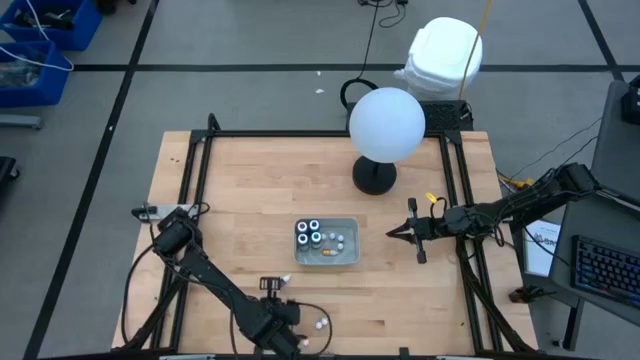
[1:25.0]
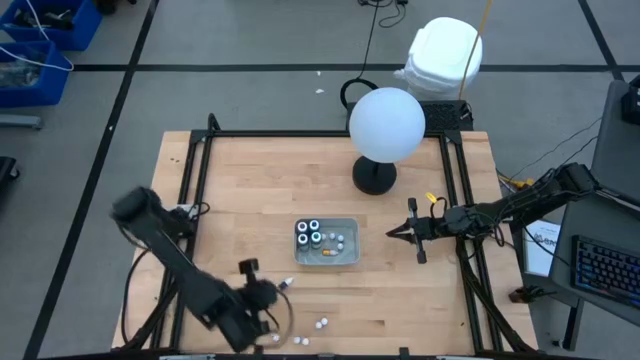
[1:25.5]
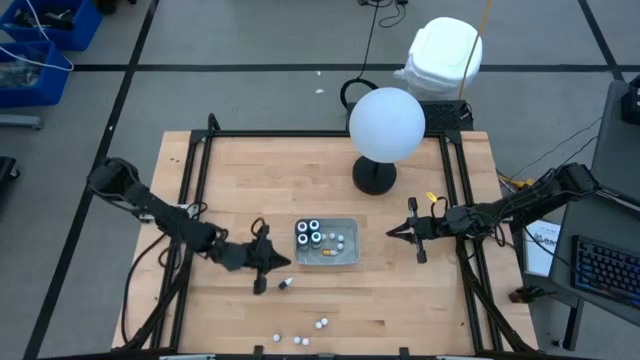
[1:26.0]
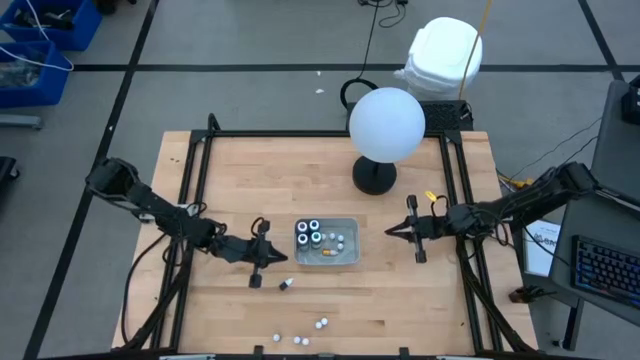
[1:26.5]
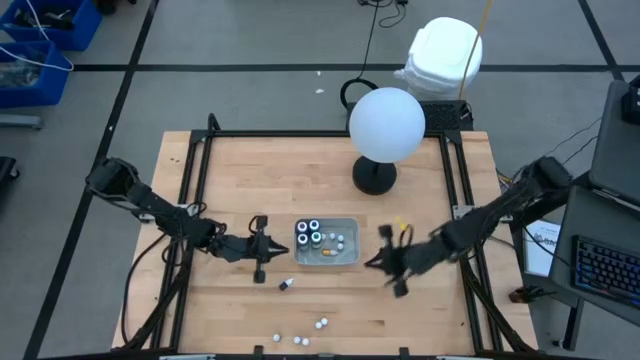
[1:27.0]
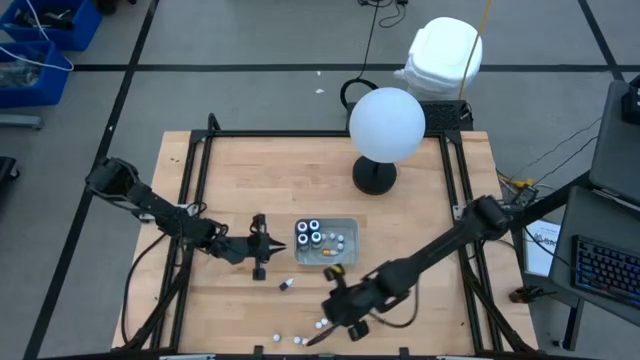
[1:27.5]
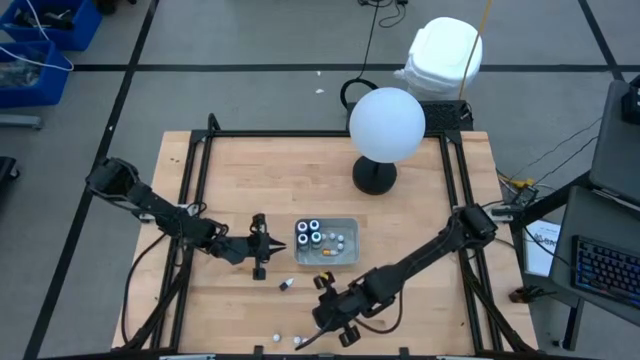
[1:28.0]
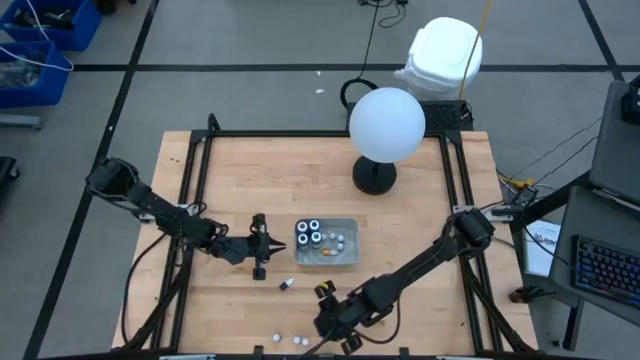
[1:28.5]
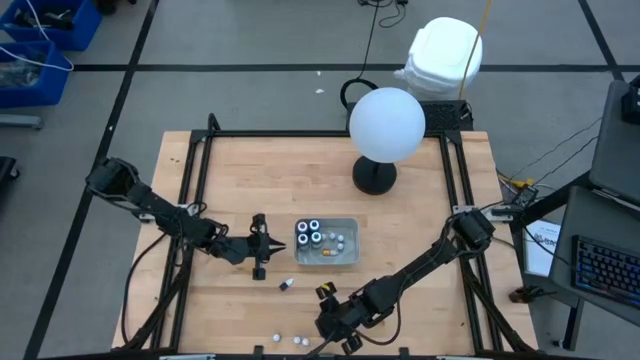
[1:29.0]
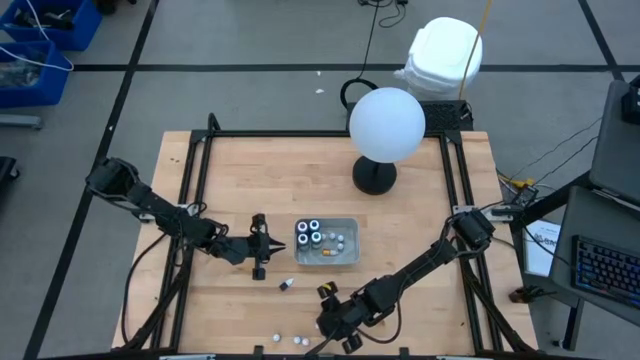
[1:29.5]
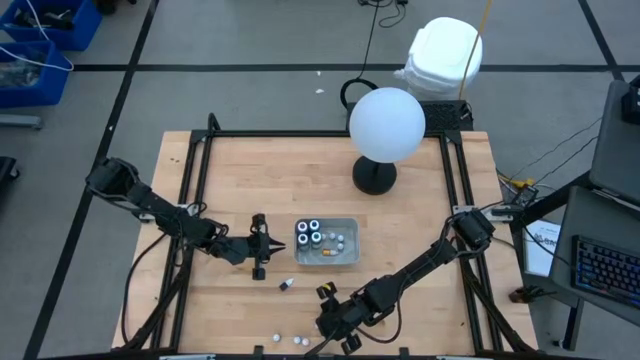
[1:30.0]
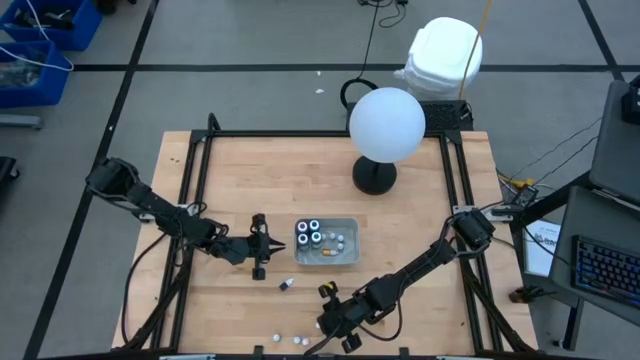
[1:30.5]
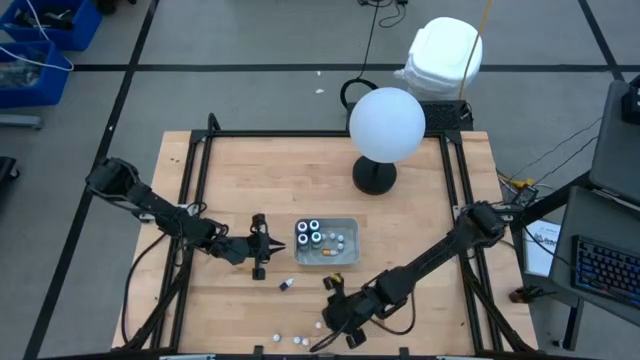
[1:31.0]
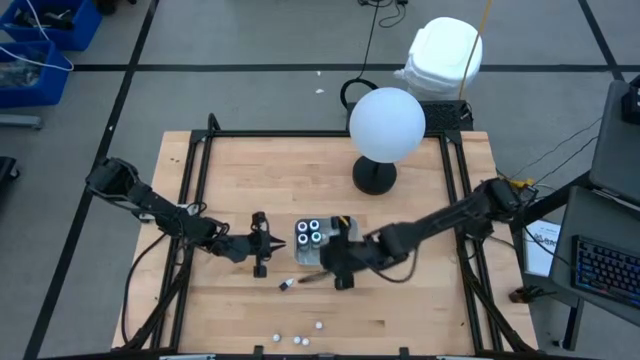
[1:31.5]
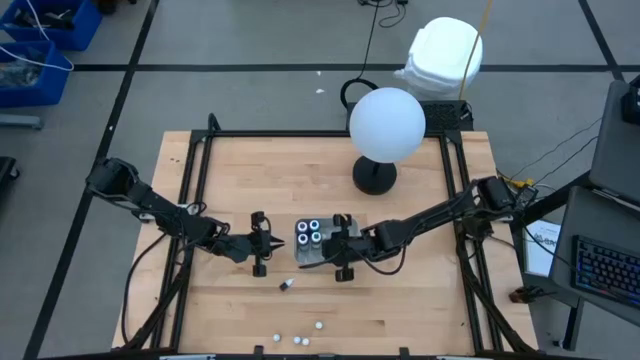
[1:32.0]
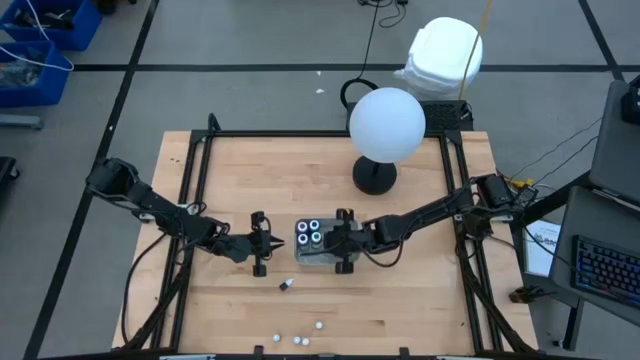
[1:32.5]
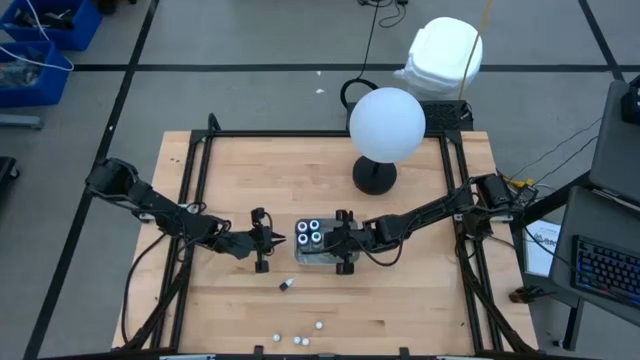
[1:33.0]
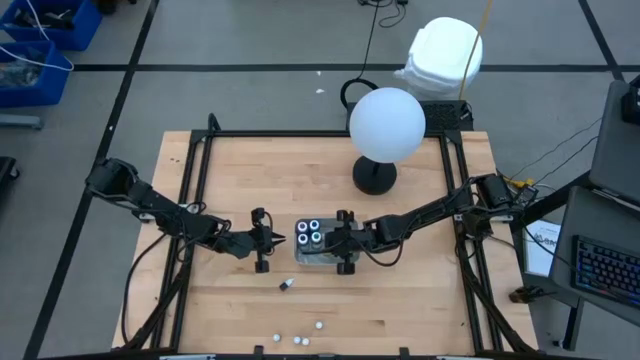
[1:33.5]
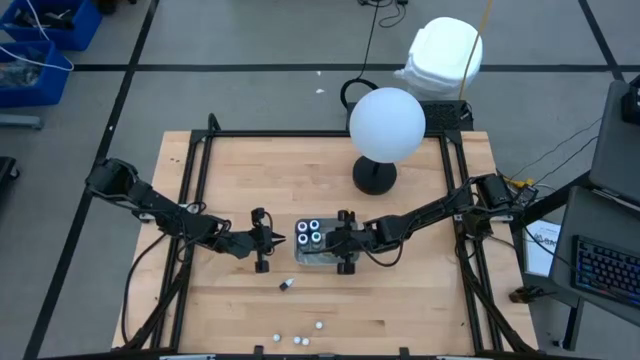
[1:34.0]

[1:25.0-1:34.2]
Task: Pick & Place food coloring
Put the small yellow food coloring bottle into the gray bin

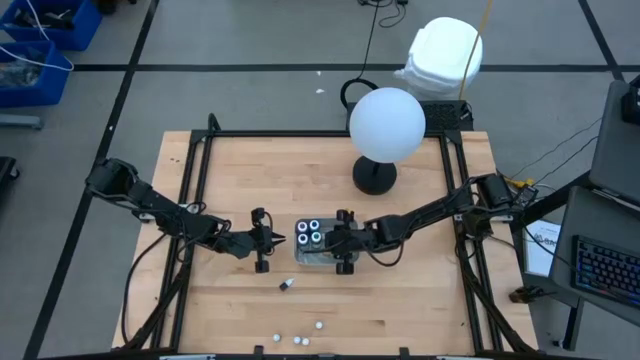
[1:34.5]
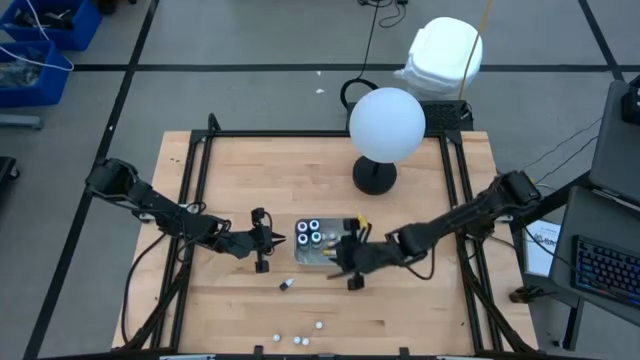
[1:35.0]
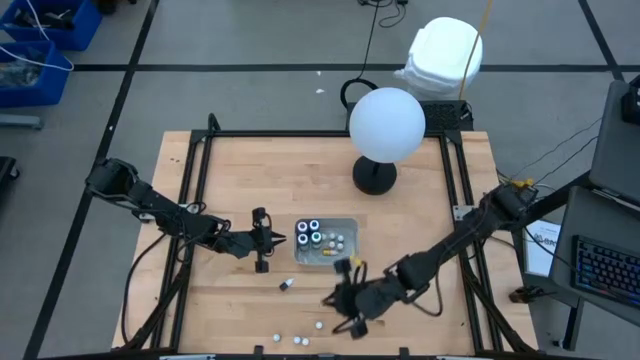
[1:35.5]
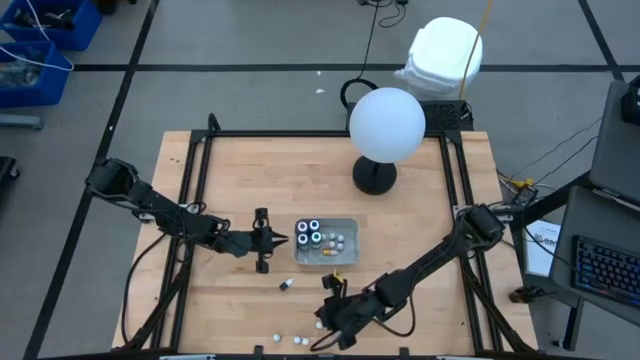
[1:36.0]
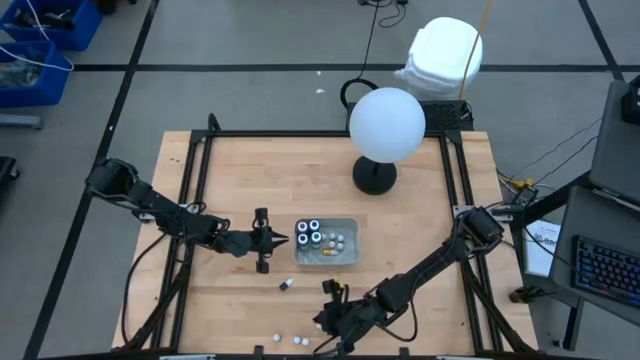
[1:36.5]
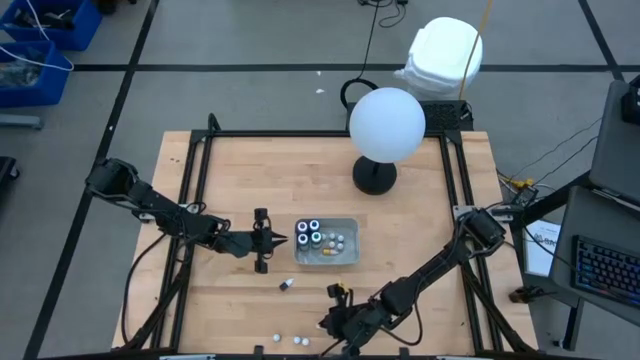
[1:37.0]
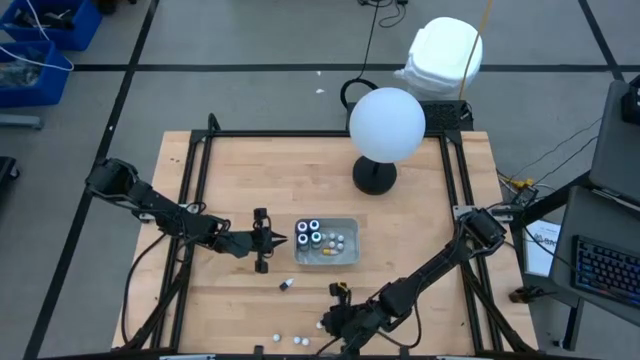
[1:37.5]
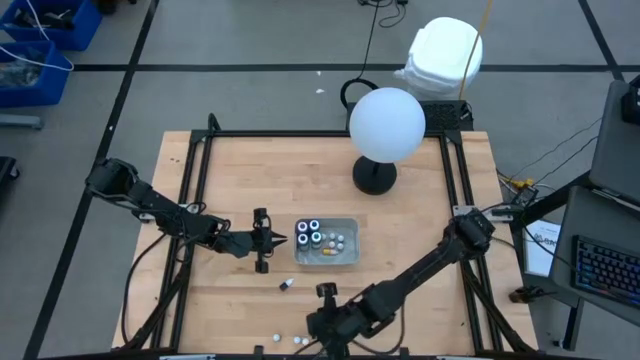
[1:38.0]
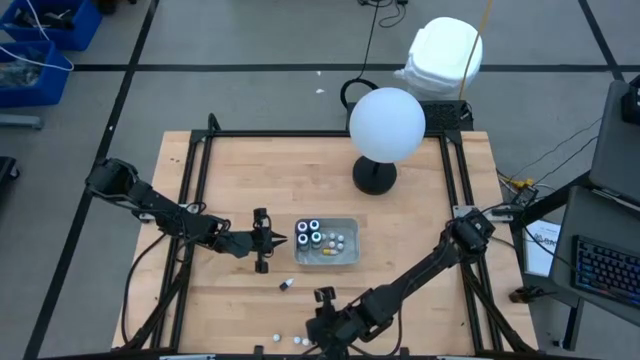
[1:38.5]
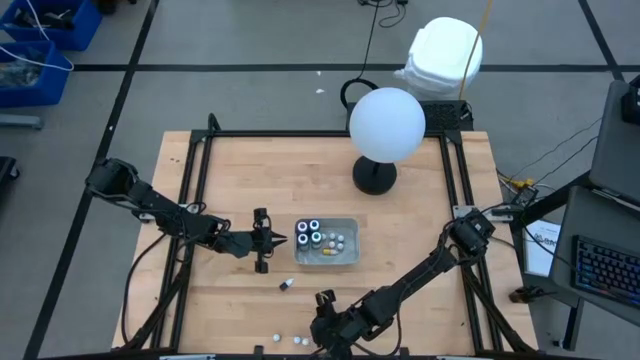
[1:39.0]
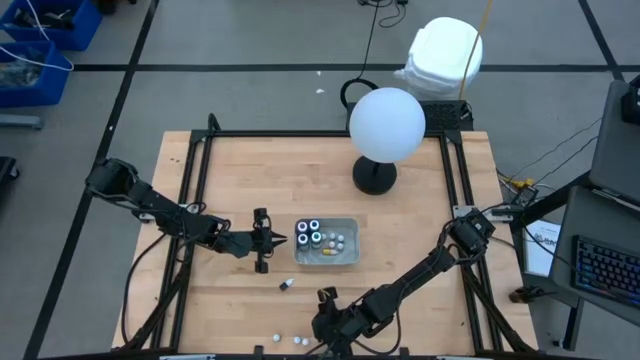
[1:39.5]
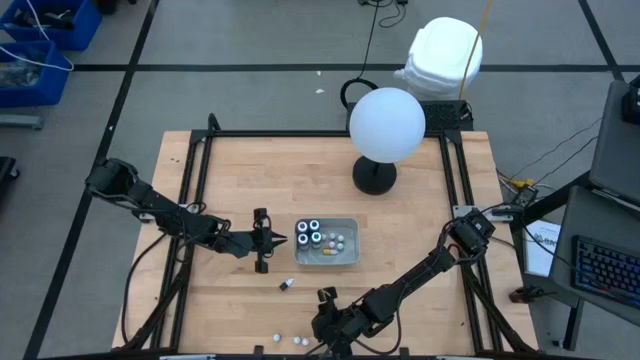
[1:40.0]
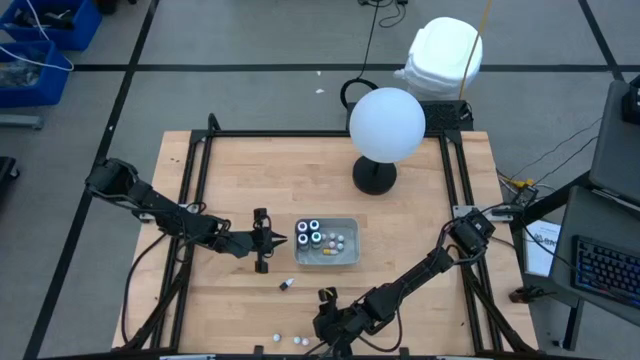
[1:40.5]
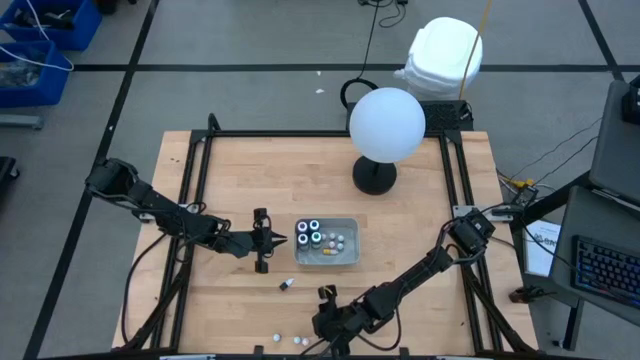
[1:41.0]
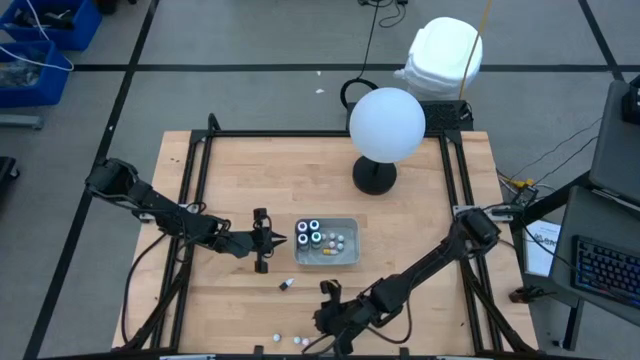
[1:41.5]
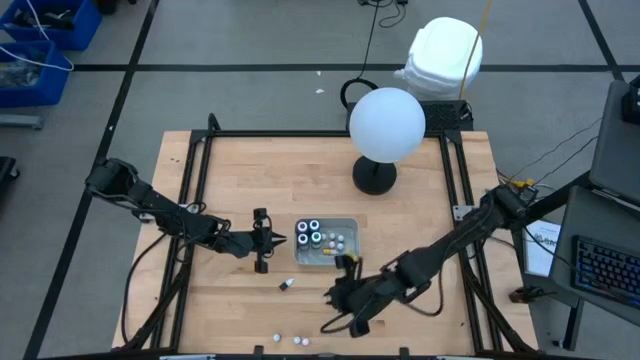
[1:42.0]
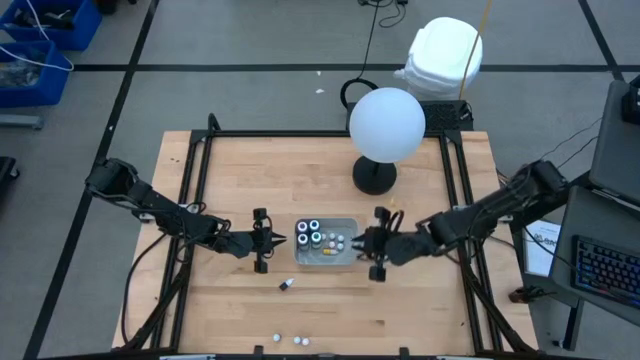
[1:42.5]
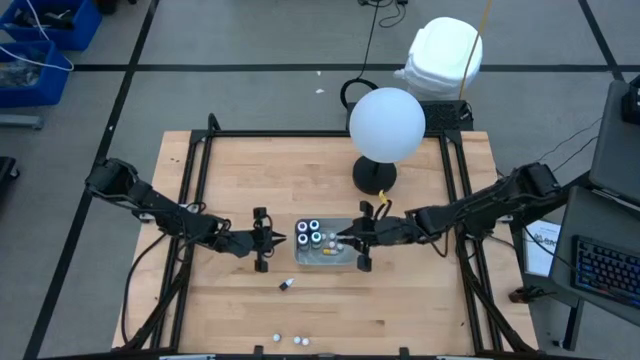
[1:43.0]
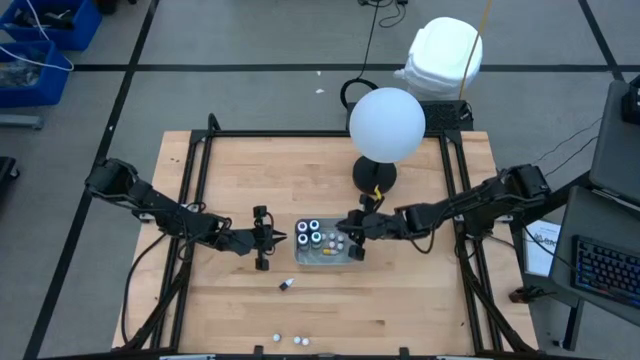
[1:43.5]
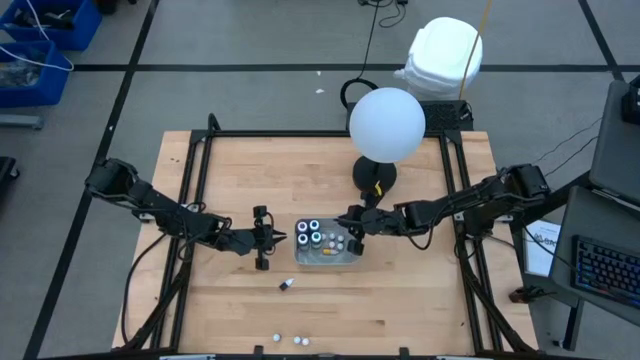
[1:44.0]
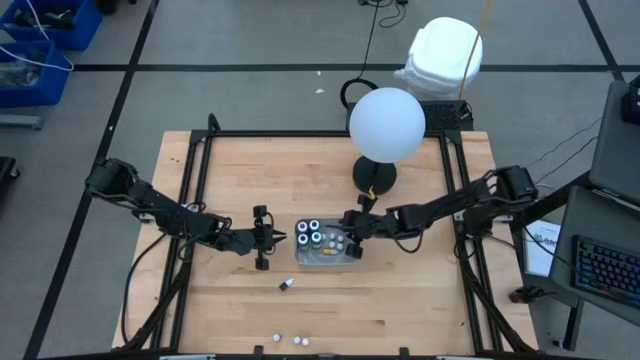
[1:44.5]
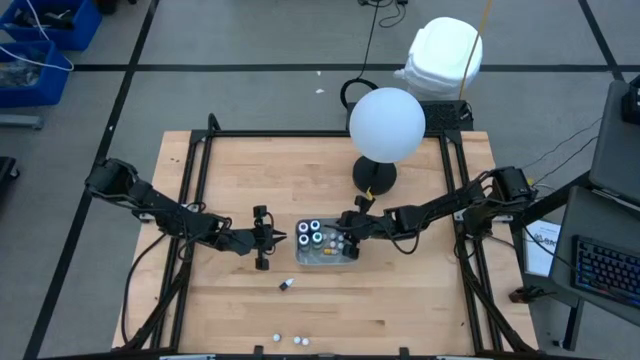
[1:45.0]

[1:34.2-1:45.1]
Put the small orange food coloring bottle into the gray bin
